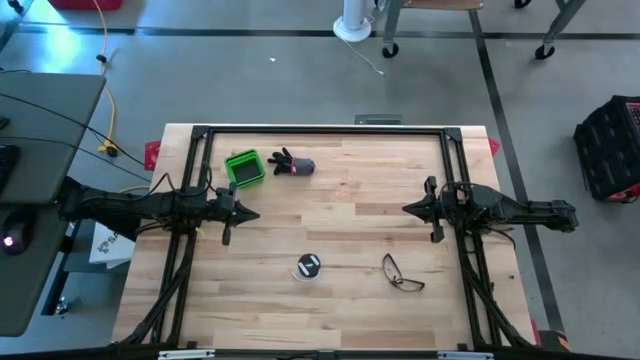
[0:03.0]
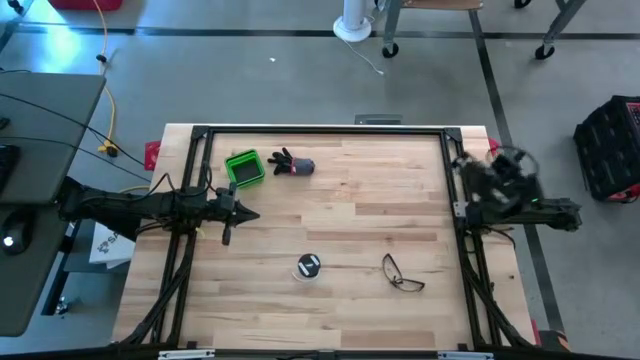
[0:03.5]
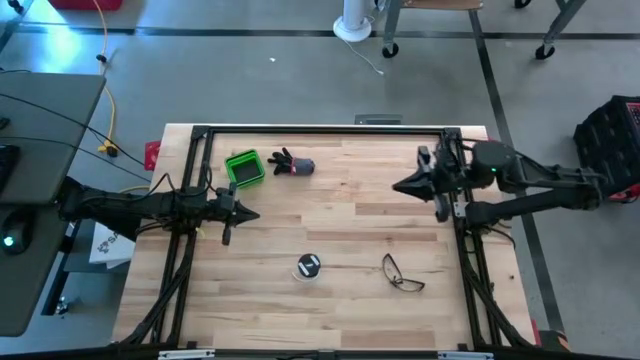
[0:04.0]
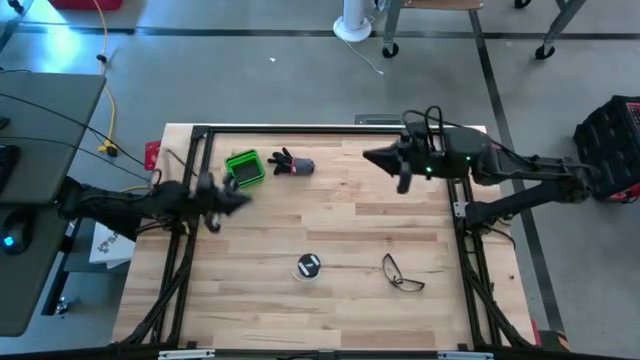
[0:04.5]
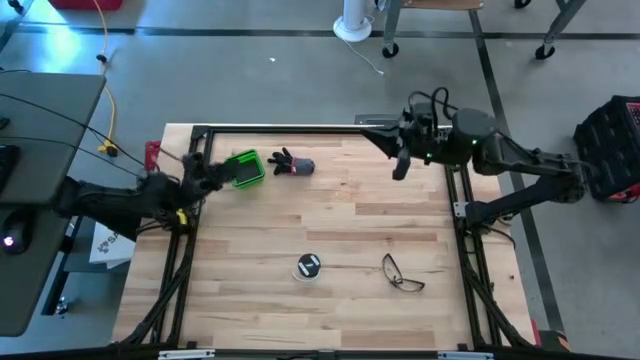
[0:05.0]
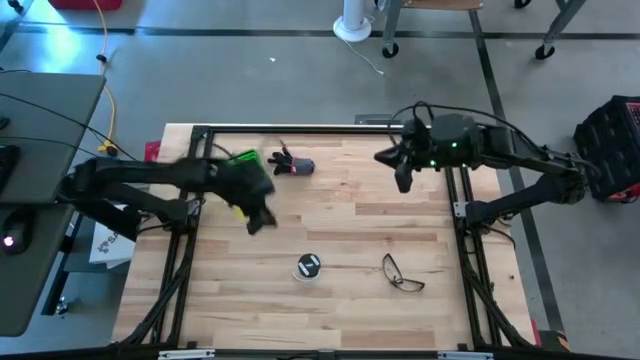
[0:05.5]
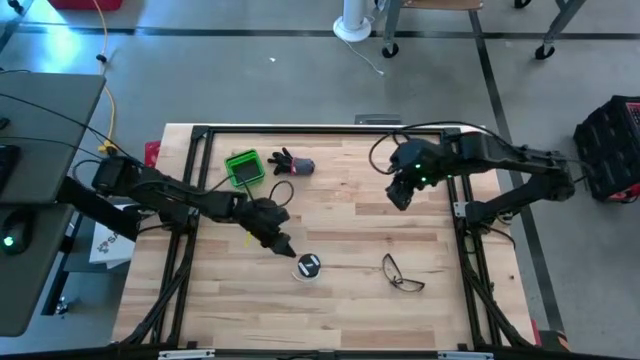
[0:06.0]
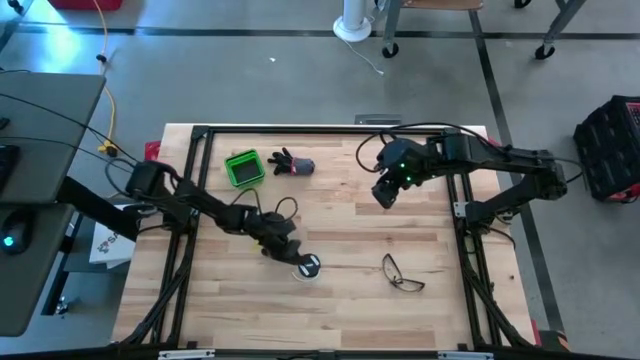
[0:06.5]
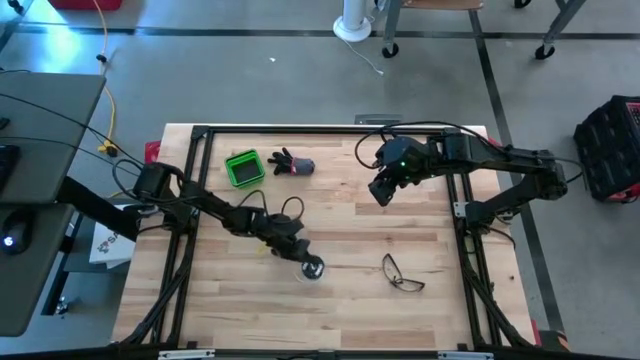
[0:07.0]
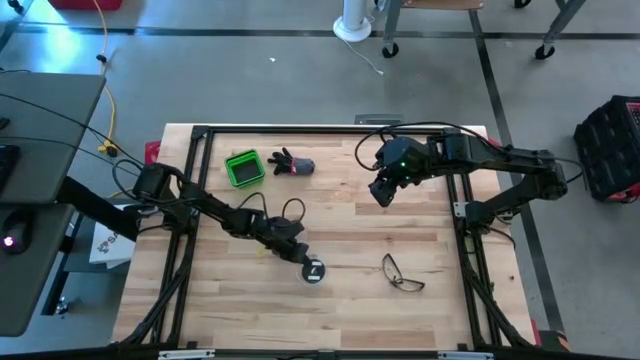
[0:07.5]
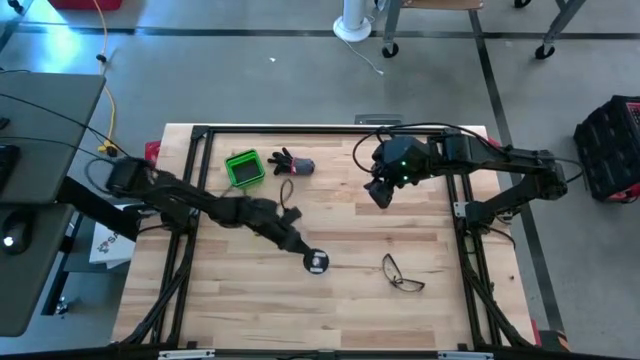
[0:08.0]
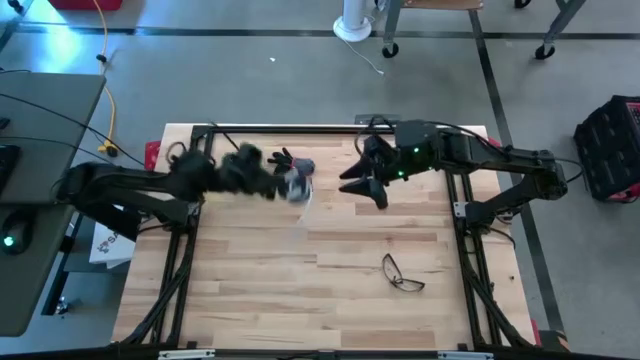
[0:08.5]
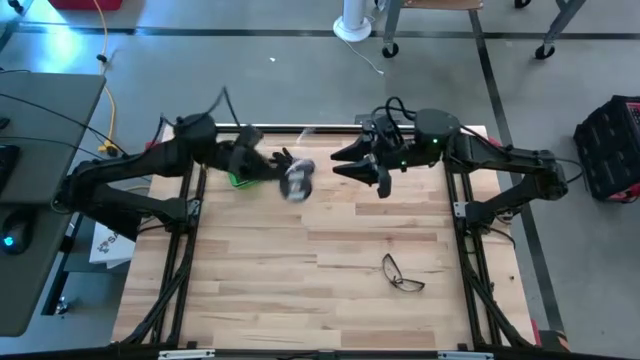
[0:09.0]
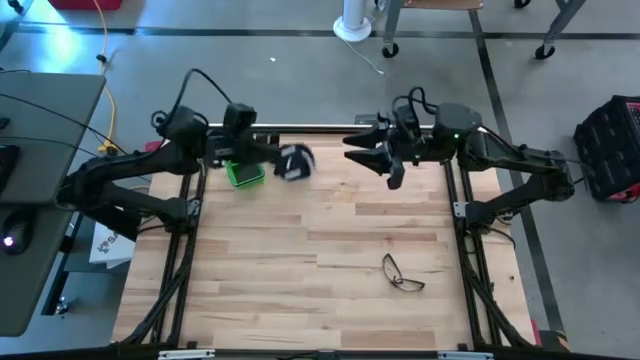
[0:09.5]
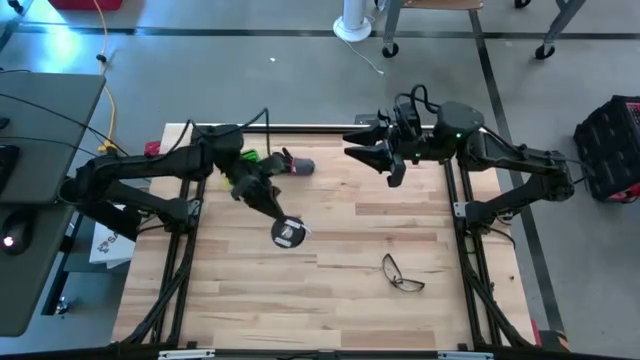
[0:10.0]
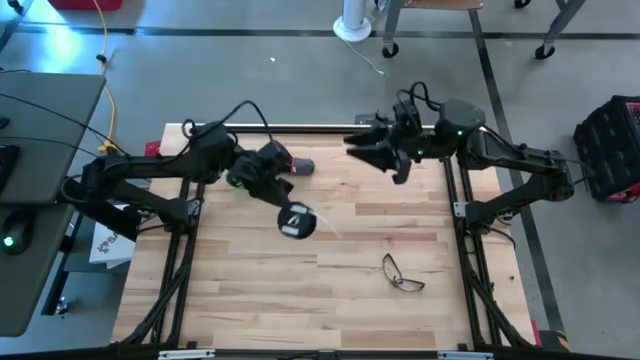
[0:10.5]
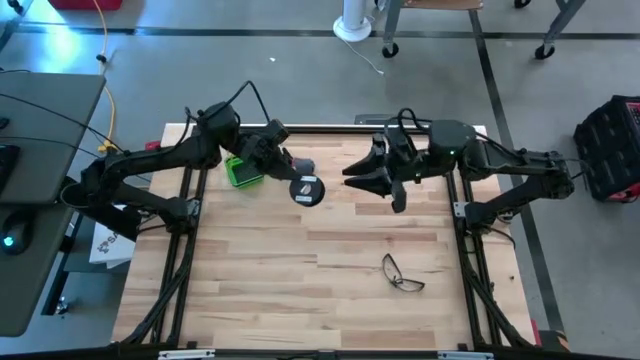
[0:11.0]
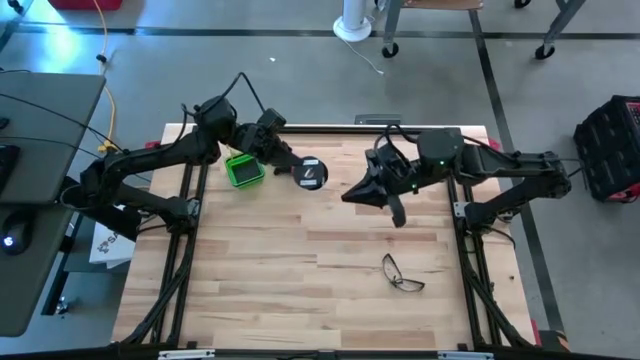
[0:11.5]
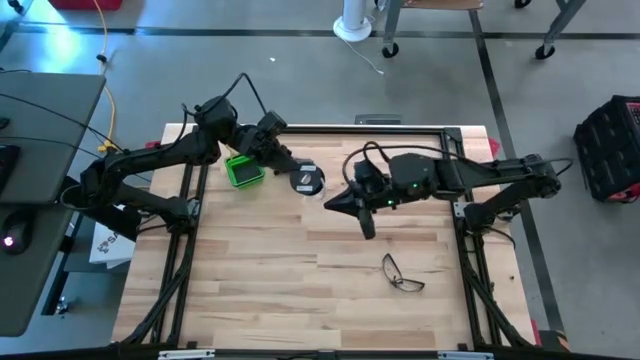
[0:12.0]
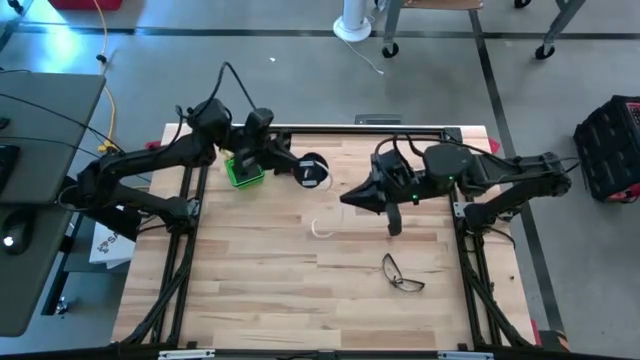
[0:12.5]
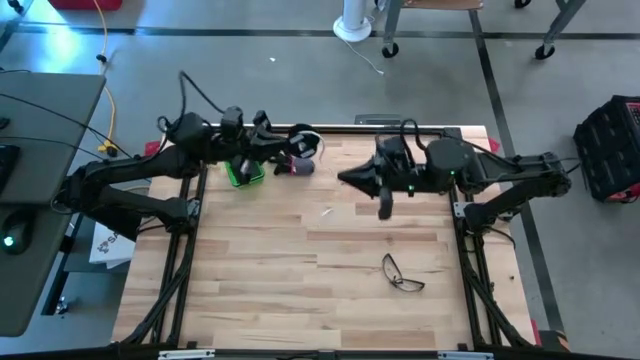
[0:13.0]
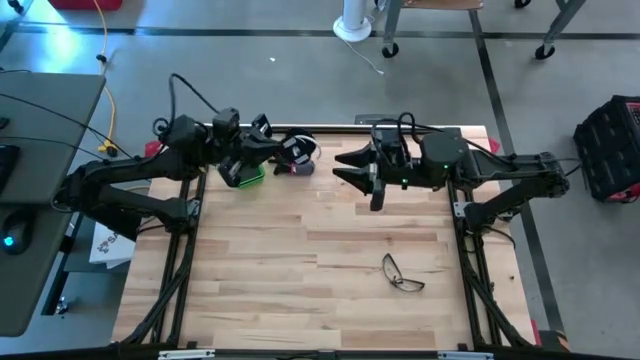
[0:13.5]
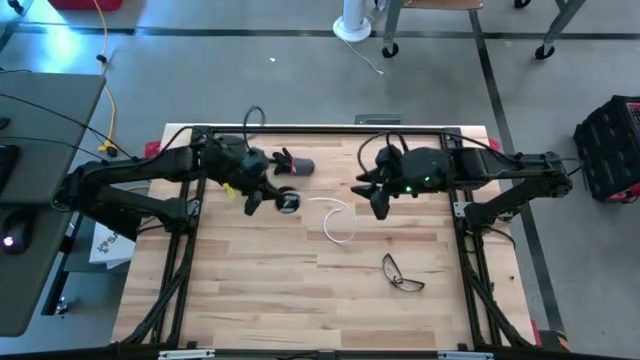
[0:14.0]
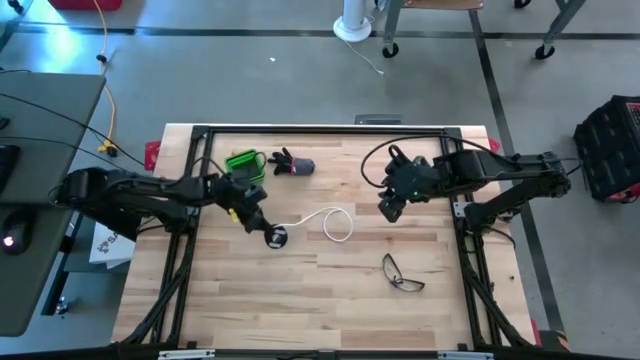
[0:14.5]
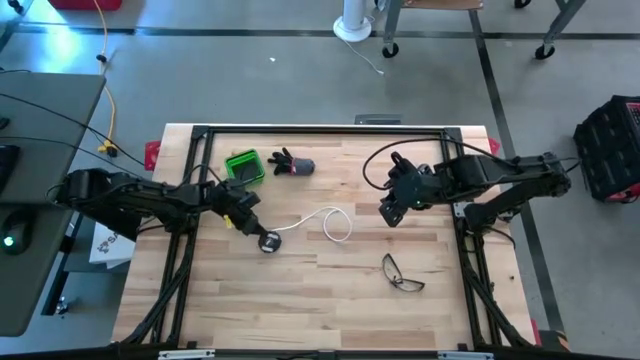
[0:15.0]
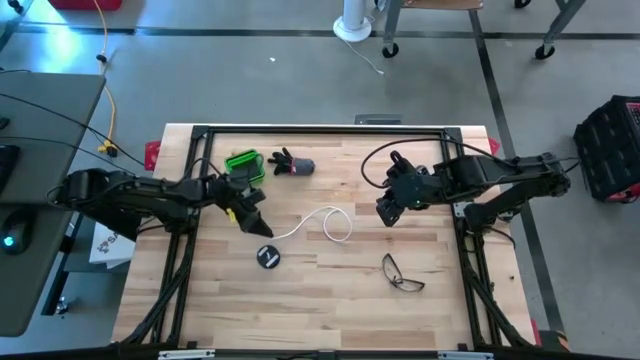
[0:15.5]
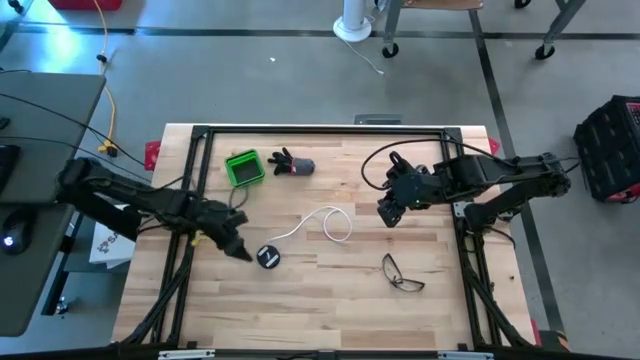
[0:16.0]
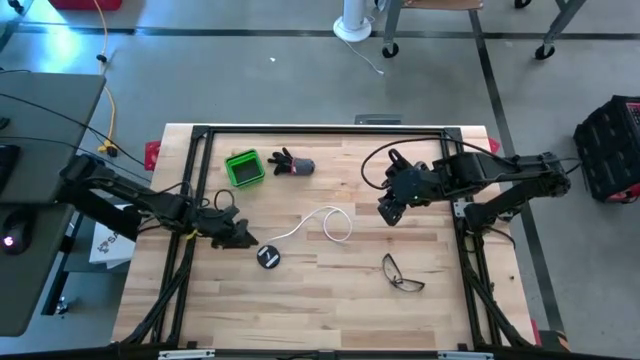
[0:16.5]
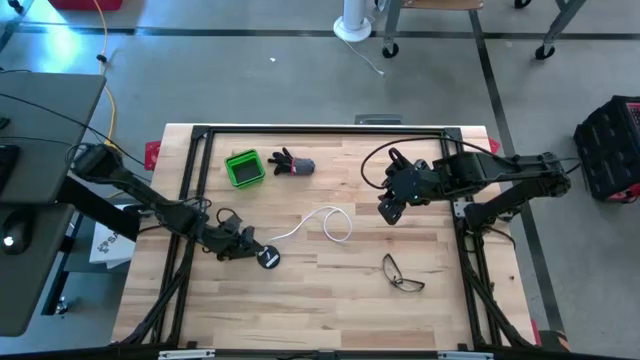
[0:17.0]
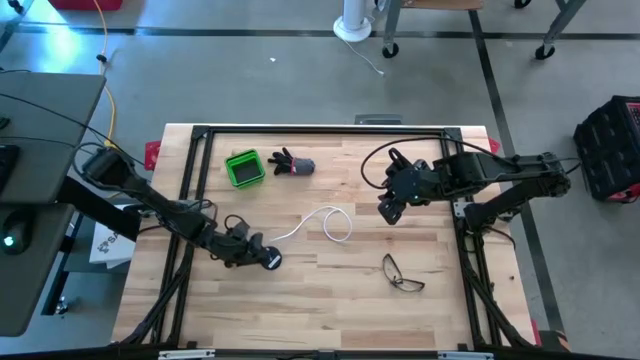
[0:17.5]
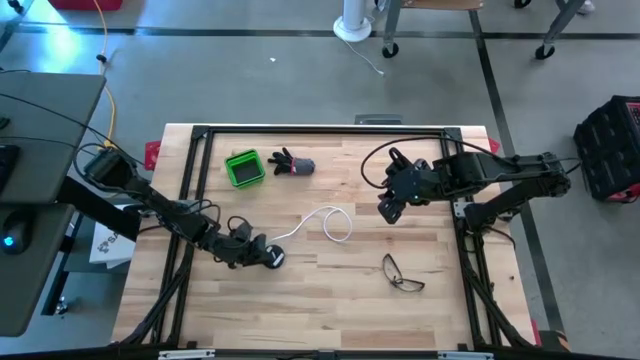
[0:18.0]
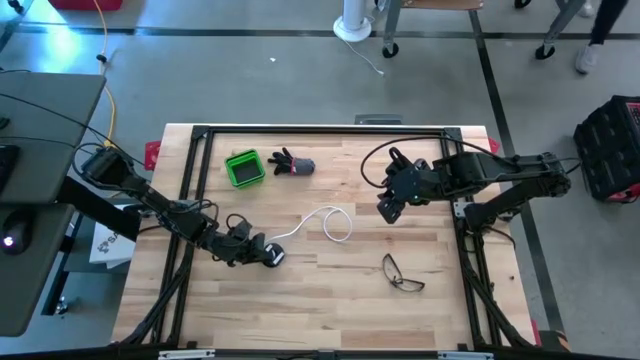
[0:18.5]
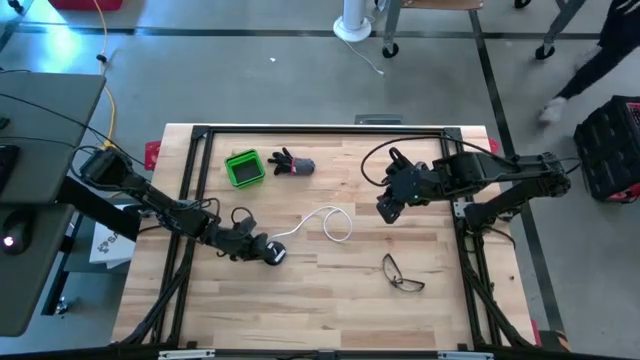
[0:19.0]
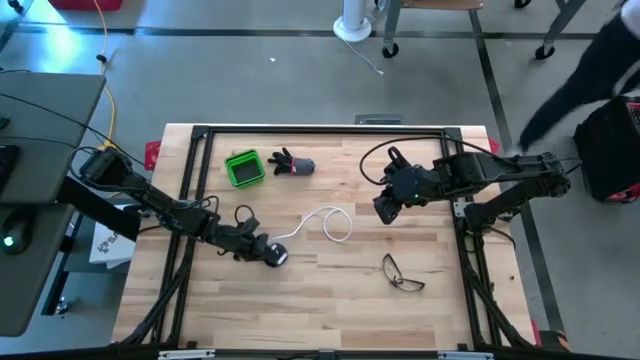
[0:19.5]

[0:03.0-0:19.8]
Task: Coil cords
Uncoil the white wire from the spool

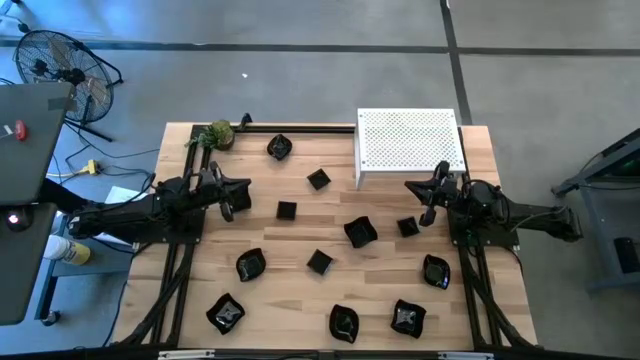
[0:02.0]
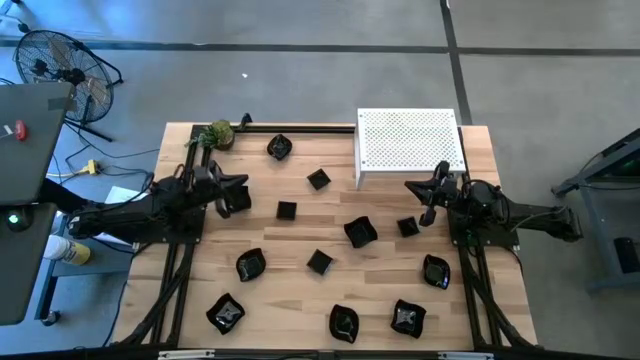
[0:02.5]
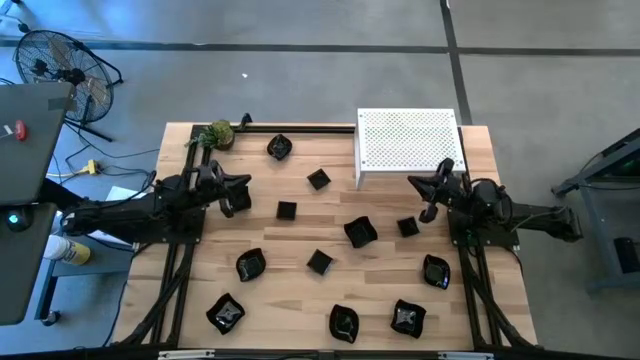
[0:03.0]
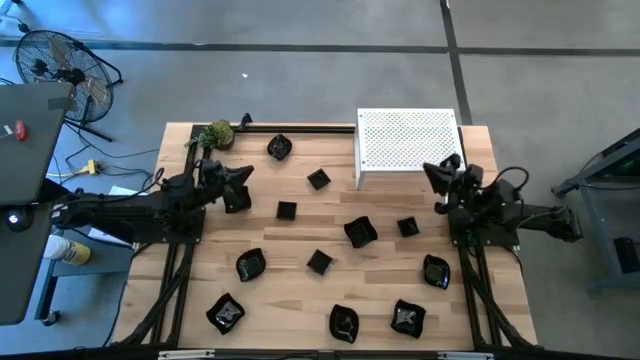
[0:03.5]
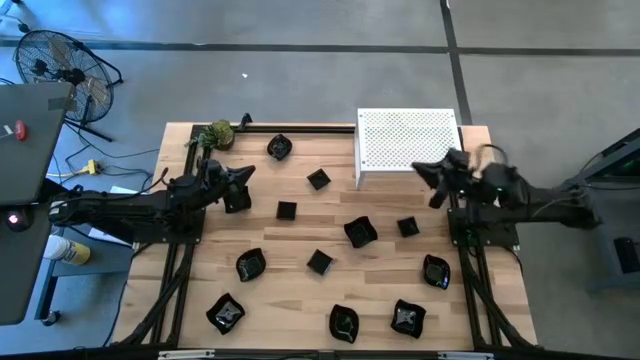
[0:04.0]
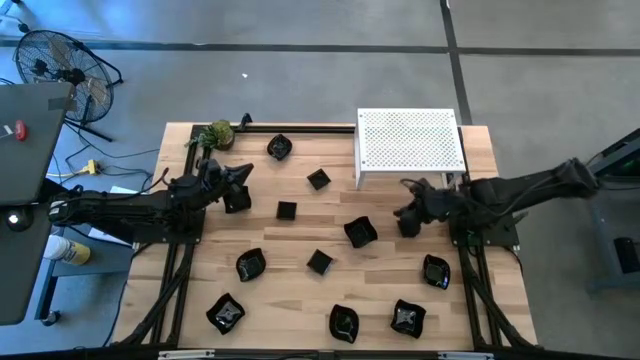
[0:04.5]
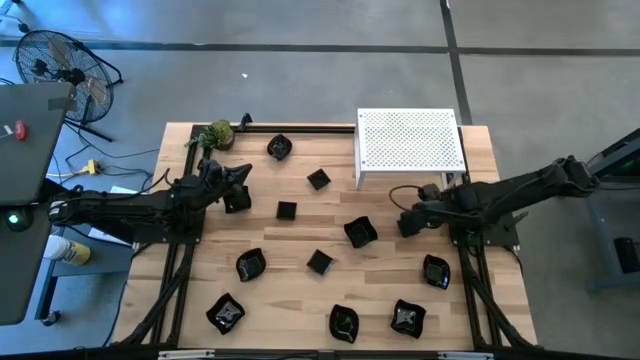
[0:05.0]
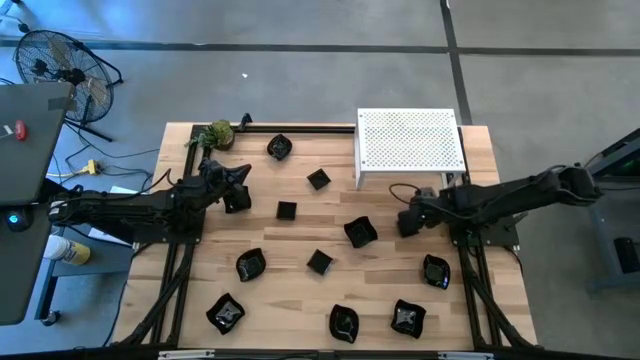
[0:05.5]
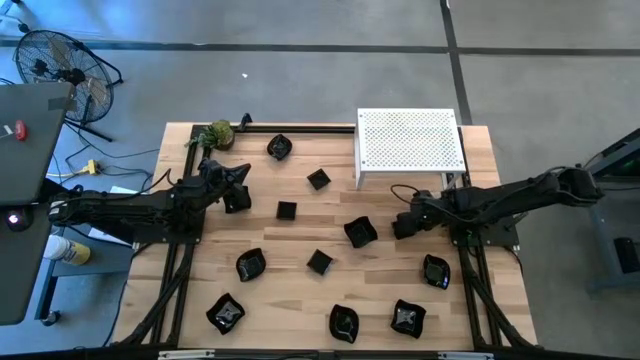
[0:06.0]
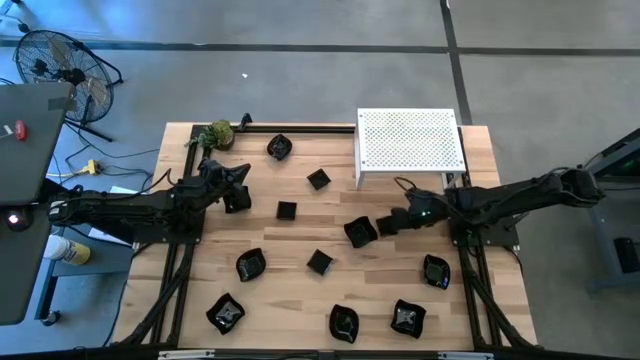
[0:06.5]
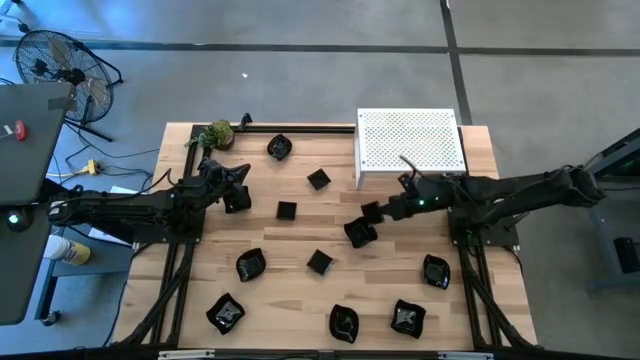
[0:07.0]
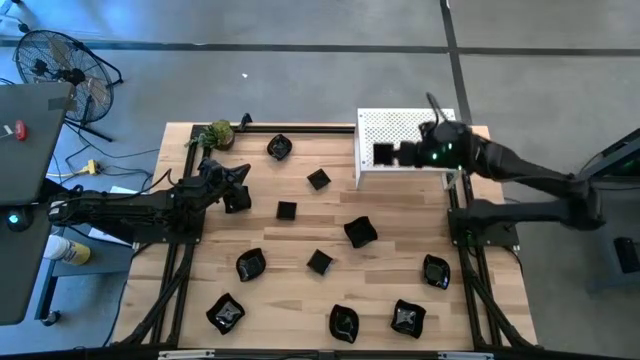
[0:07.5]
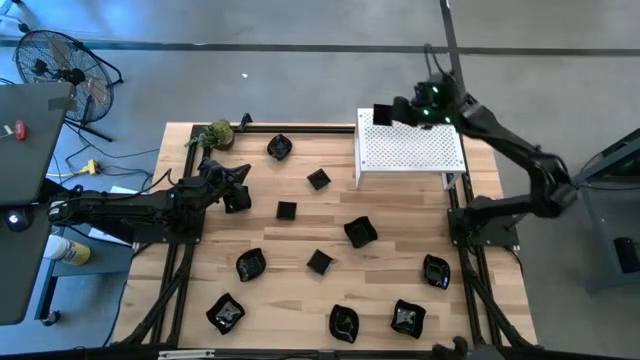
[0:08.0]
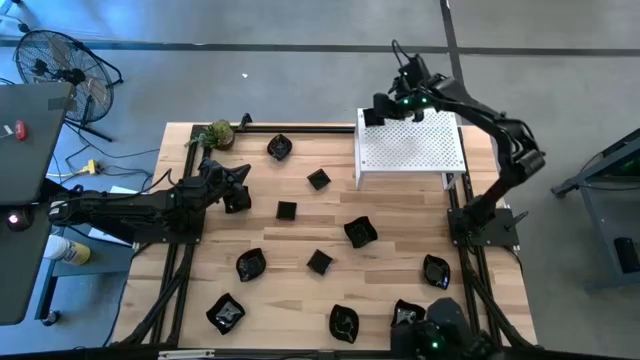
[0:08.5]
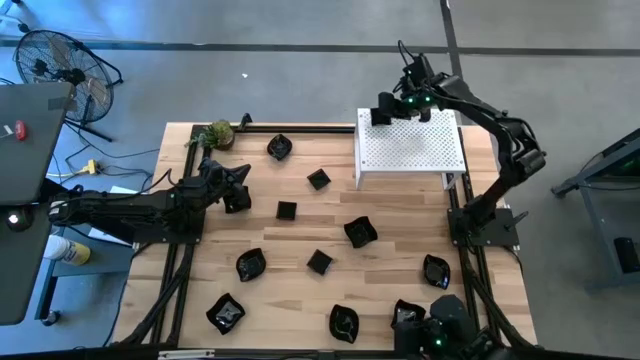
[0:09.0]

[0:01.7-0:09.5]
Task: Pick & Place Mini shaped plates
Put the square plate on the shelf
